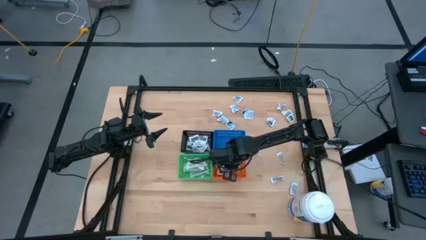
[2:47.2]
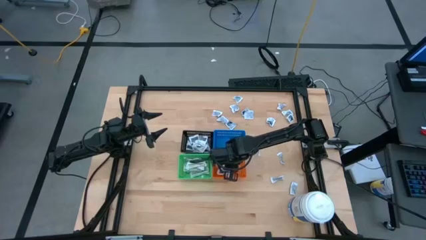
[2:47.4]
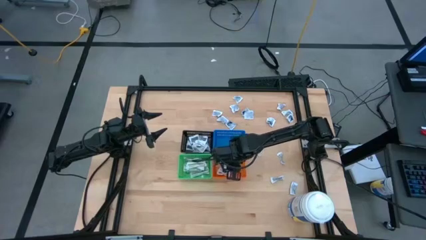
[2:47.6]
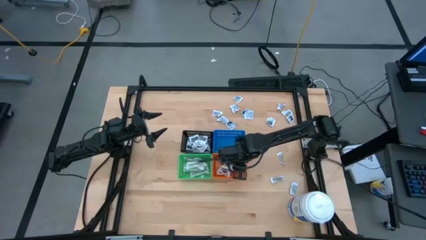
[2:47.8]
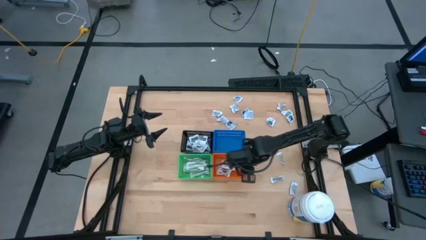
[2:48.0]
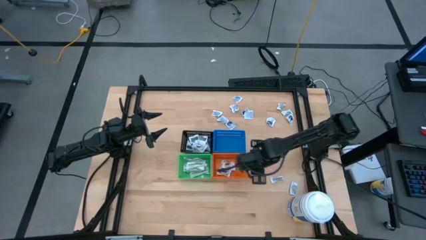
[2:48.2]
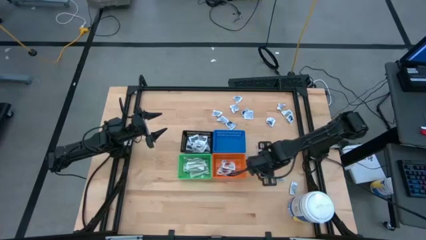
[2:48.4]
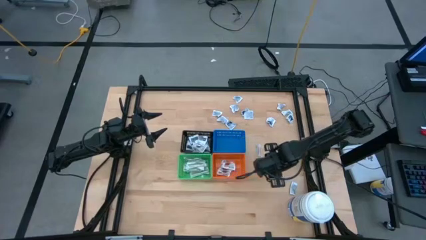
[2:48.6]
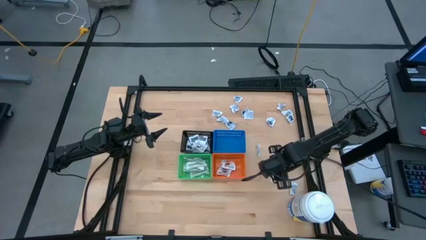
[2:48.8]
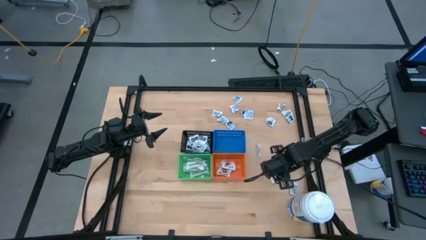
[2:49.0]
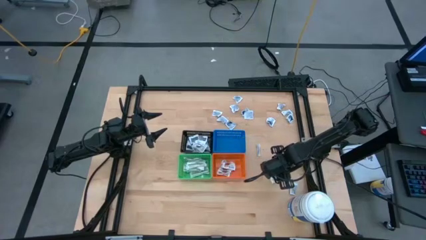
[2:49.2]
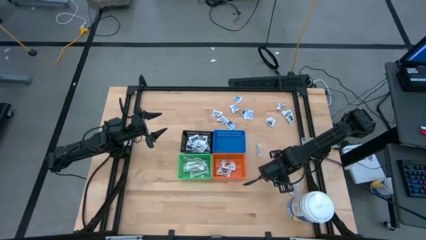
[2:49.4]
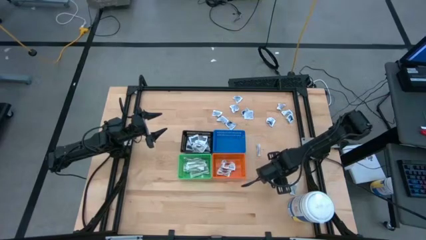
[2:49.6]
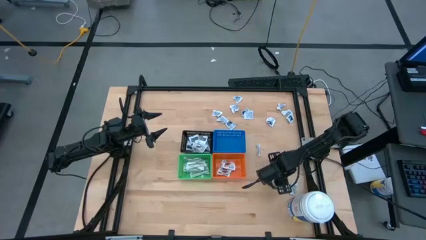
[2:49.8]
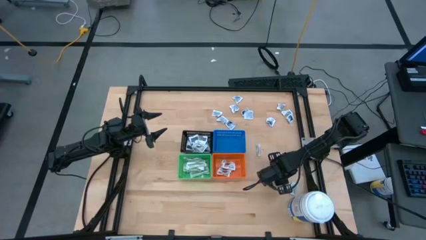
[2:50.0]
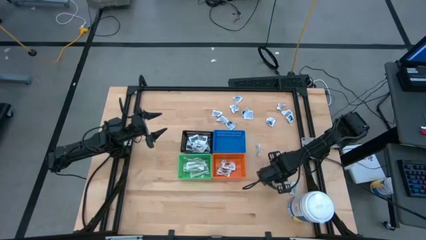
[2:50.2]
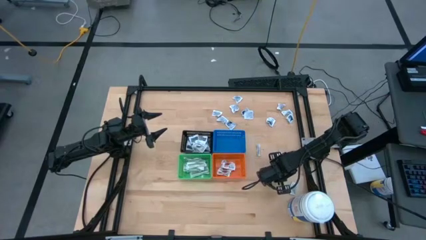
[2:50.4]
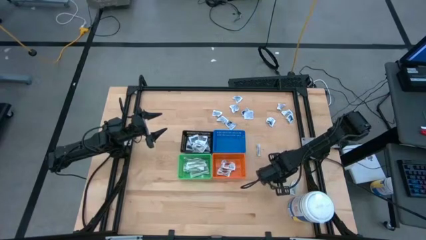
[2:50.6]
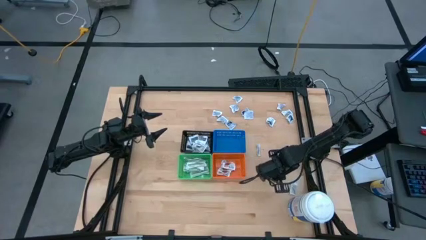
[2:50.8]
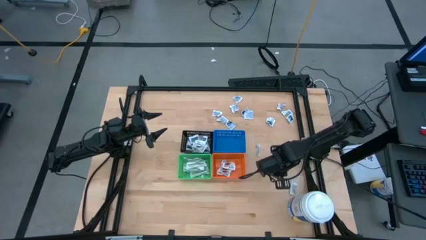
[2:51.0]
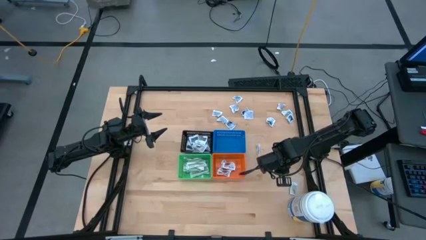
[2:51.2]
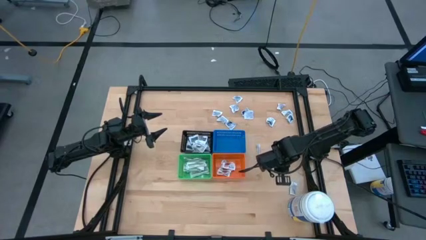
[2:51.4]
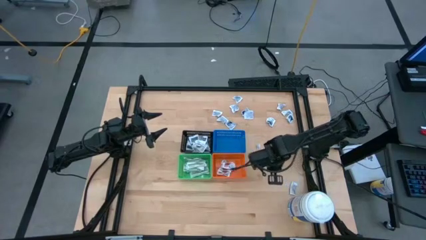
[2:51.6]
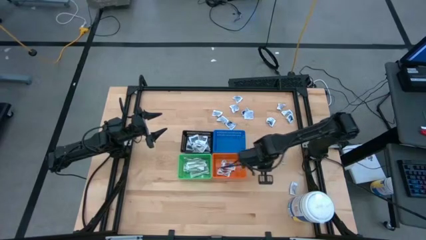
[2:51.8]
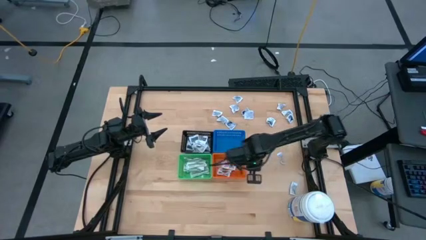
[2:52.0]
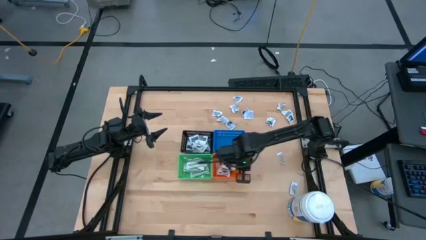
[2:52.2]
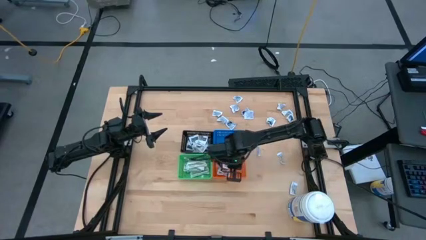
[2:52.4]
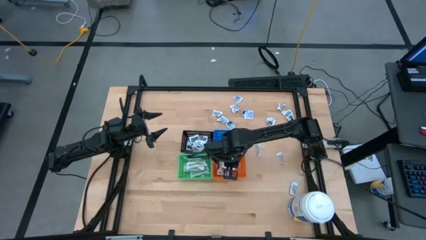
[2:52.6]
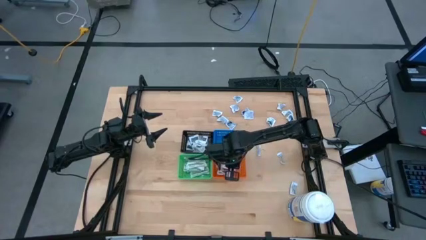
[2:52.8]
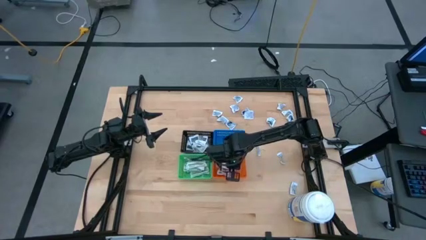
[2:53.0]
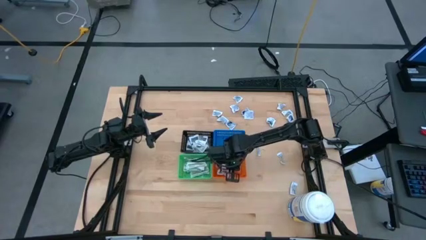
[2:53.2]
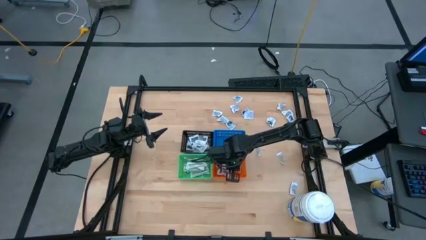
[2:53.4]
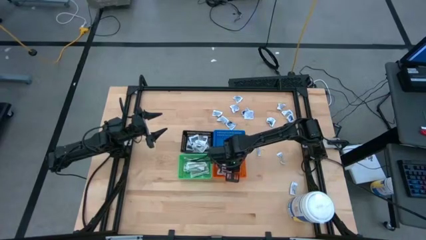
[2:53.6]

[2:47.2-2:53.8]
Task: Pick & Place First Aid Supplies
Put the ointment pack into the orange bin

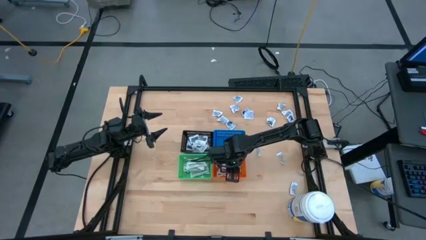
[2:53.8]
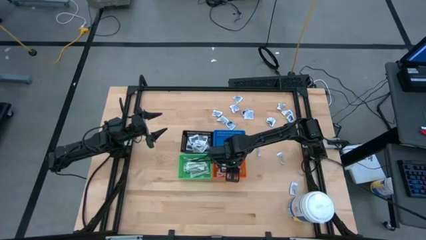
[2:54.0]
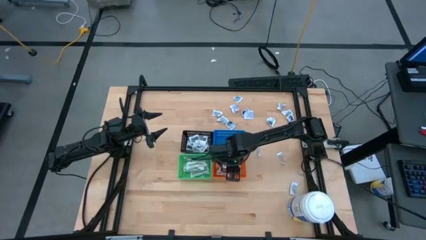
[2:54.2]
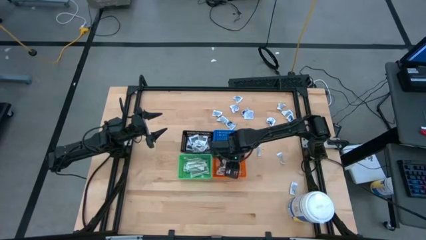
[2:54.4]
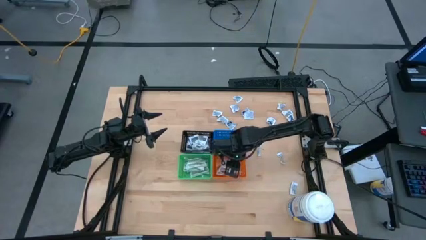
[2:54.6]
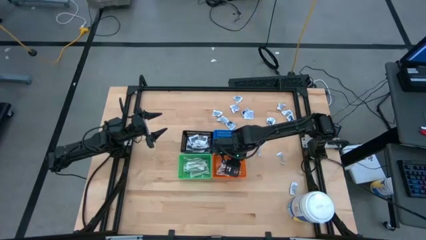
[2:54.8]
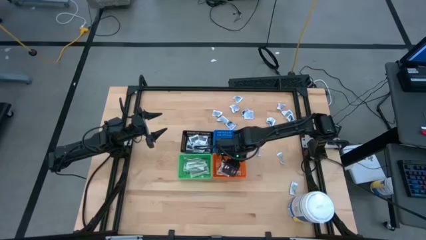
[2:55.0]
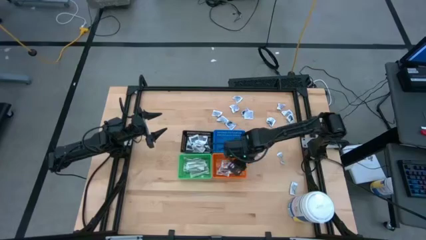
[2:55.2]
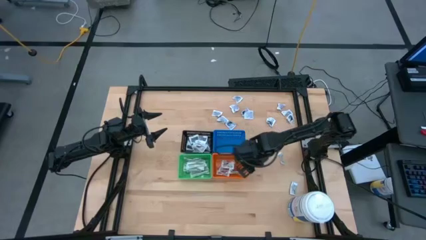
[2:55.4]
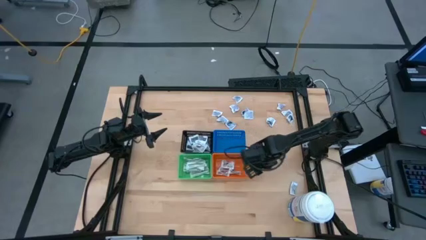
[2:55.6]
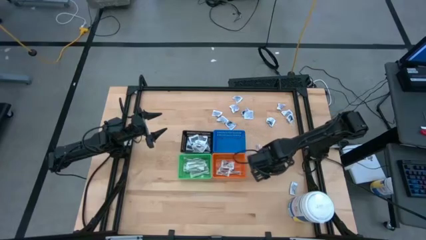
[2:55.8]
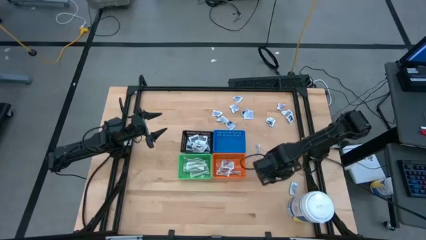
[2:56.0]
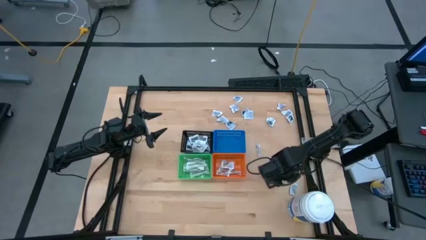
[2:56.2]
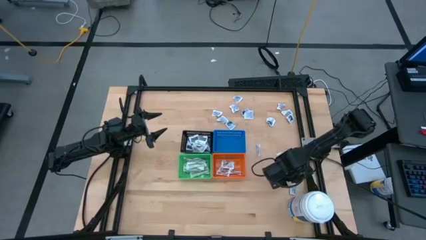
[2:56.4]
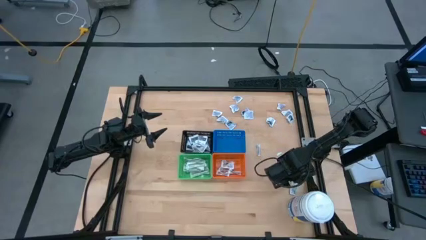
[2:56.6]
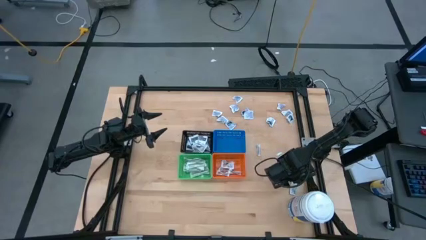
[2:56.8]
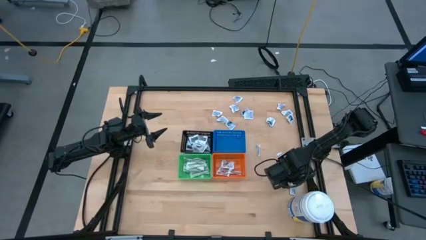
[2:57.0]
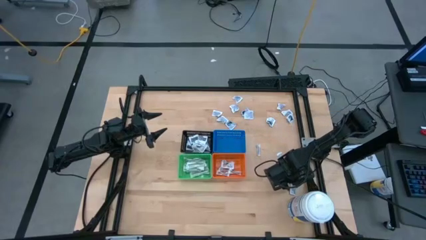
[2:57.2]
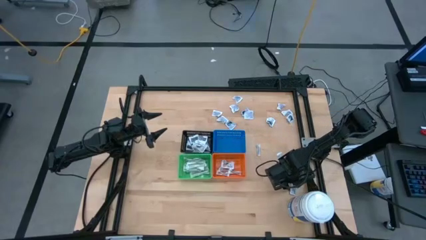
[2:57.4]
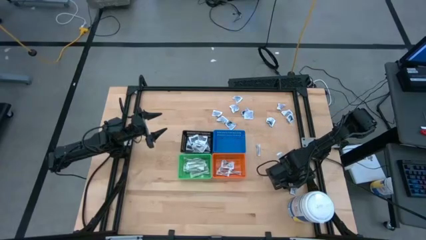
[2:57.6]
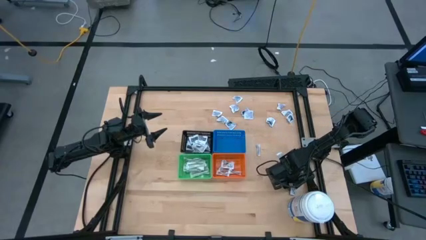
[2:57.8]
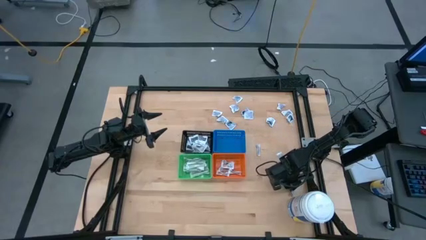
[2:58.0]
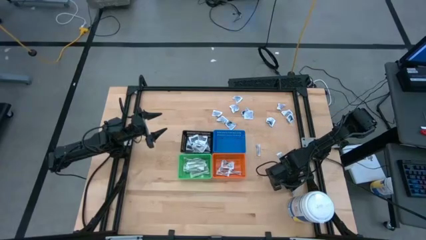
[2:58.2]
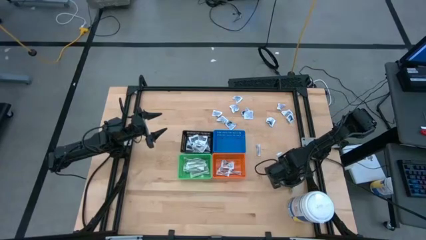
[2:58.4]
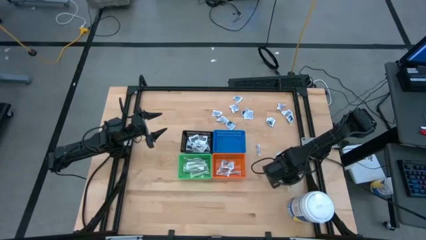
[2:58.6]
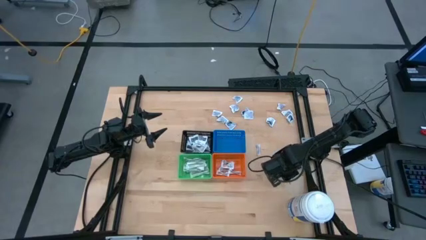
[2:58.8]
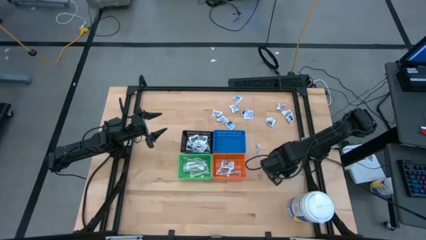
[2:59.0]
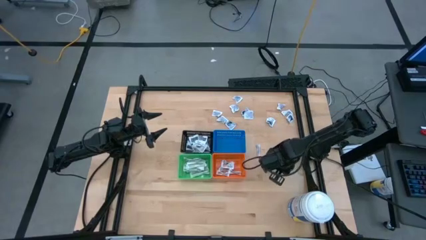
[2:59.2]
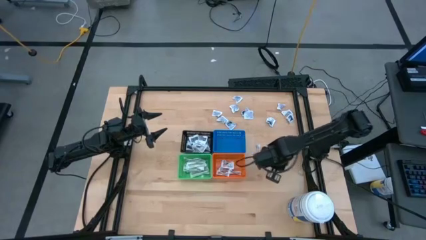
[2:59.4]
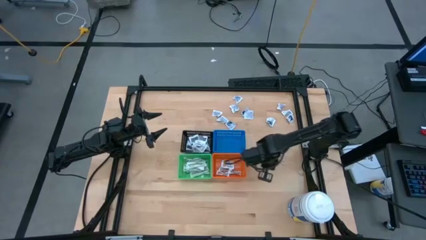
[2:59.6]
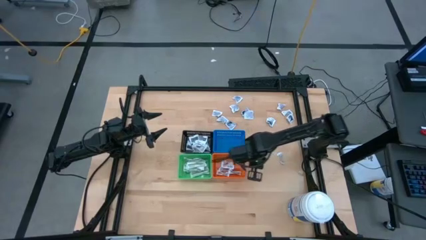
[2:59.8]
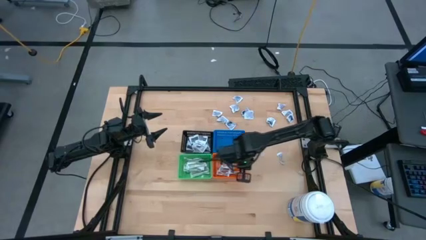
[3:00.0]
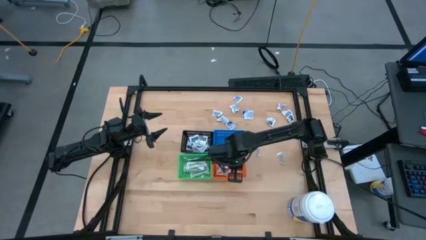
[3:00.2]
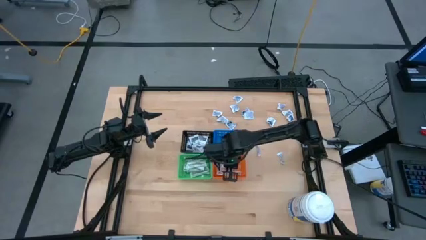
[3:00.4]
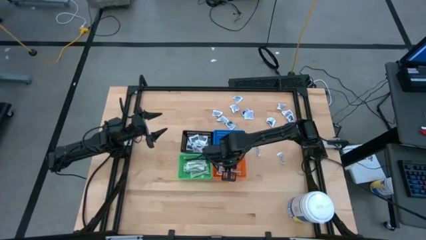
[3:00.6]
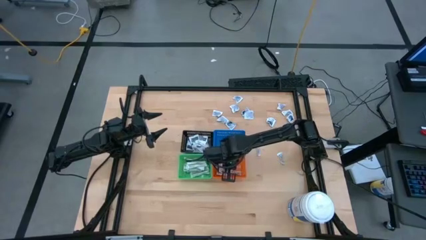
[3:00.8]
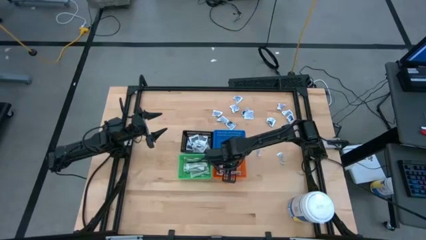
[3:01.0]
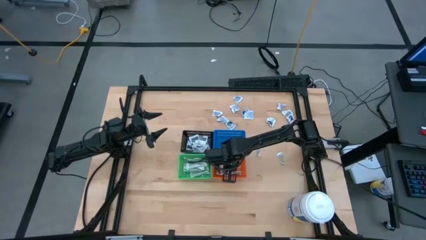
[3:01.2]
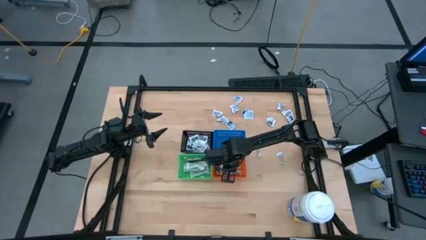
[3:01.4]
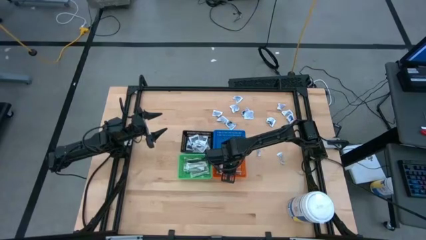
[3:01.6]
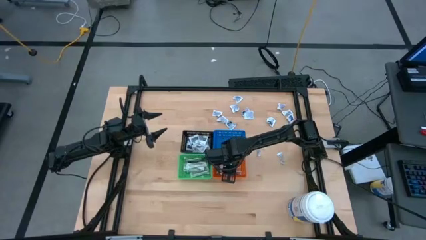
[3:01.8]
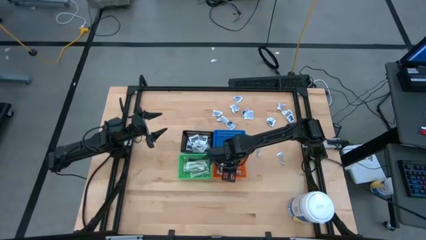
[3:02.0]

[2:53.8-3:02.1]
Put the ointment pack into the orange bin

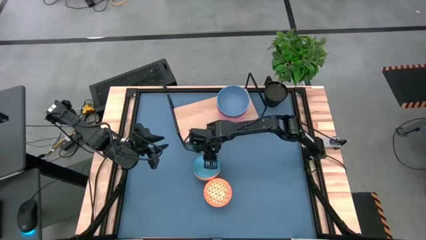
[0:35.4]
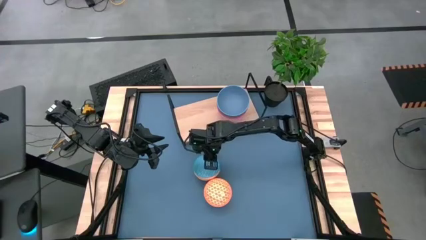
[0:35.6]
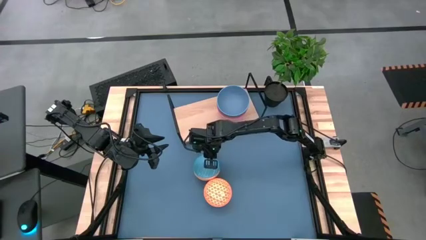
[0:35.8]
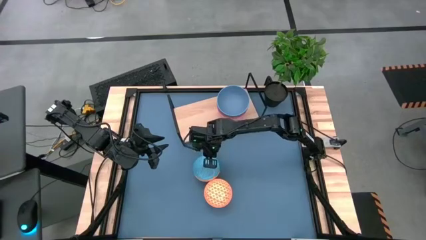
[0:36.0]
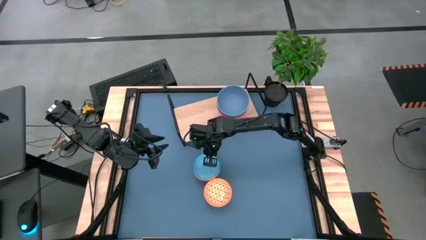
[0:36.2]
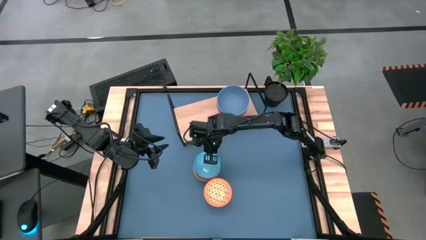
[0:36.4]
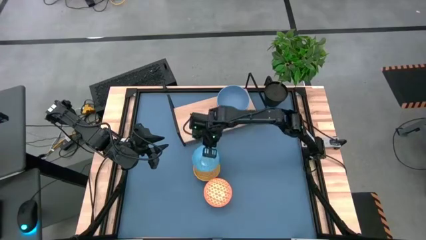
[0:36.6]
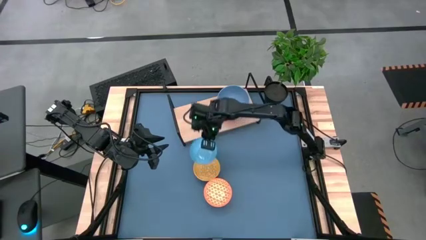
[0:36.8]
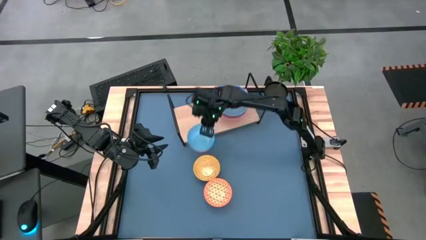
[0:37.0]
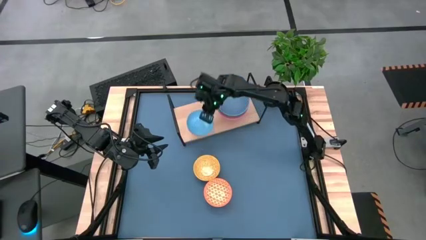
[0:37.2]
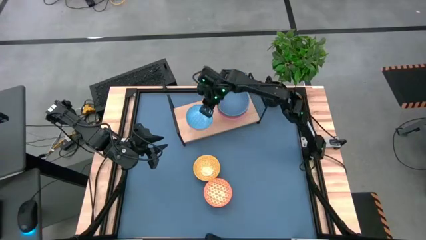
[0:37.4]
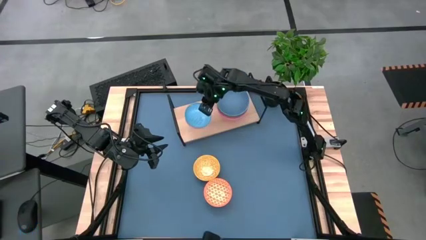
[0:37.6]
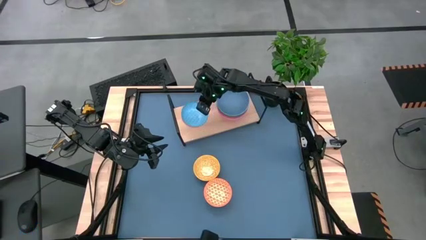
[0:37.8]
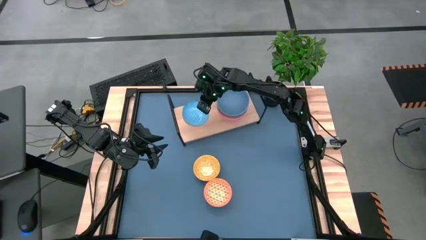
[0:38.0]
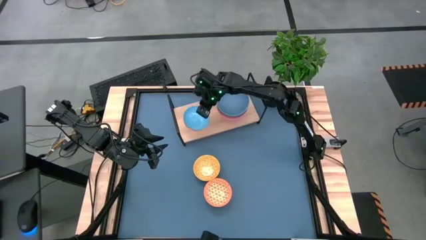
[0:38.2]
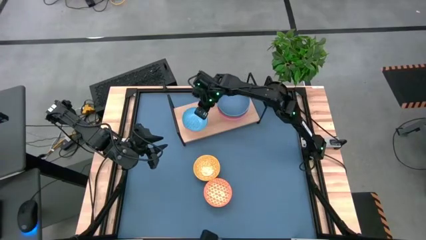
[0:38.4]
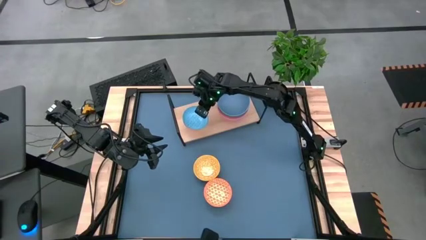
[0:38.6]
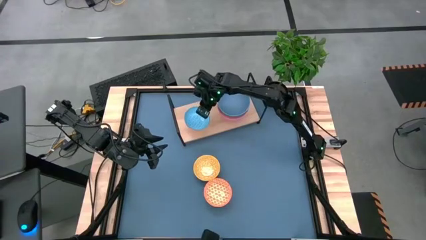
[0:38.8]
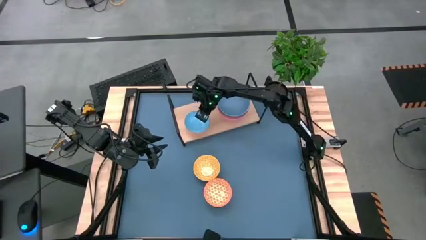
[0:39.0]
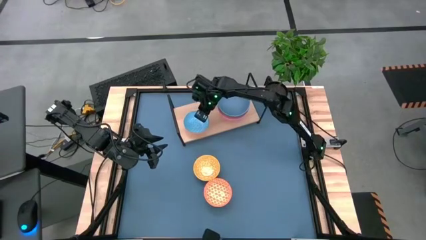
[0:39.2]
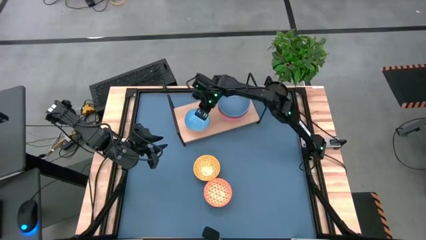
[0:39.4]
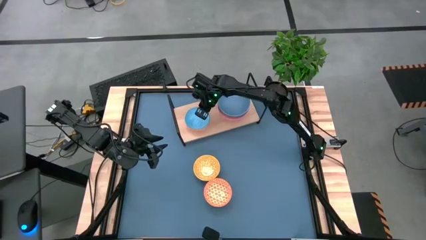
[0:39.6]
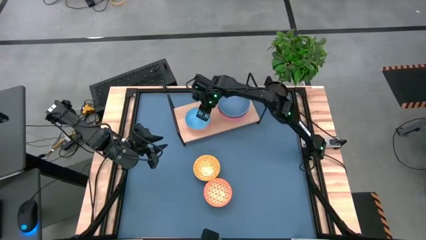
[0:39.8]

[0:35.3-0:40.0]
Task: Place and stack bowls onto a shelf
Put the light blue bowl on the shelf
